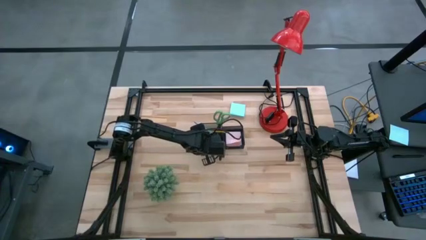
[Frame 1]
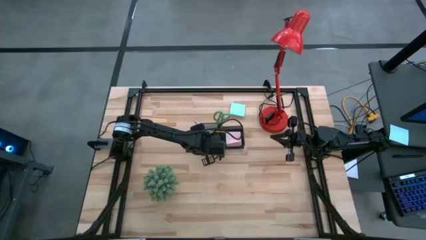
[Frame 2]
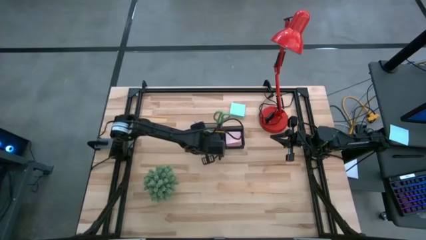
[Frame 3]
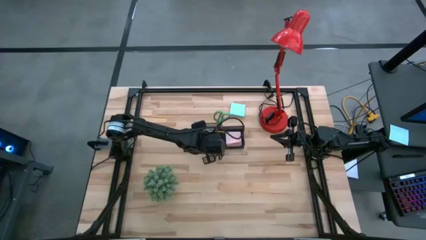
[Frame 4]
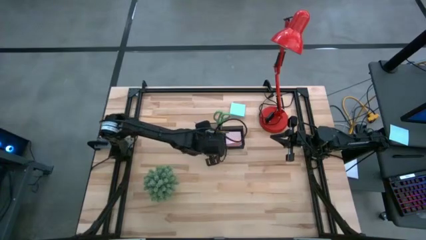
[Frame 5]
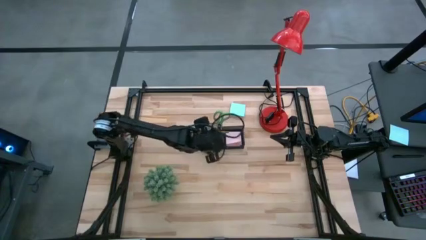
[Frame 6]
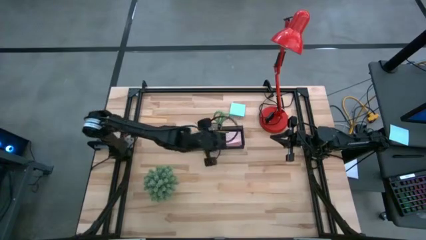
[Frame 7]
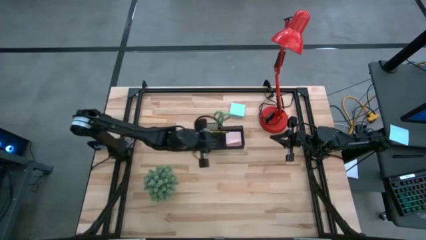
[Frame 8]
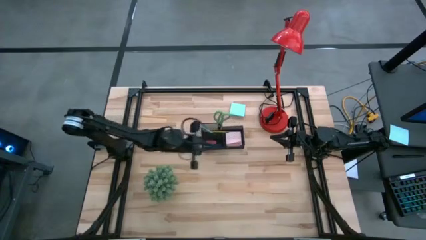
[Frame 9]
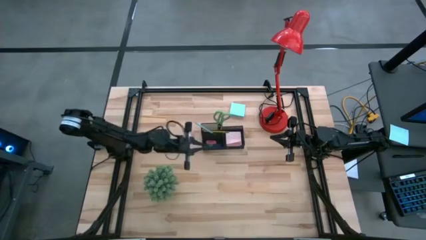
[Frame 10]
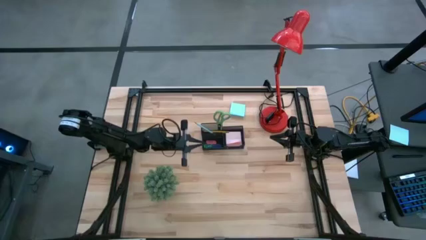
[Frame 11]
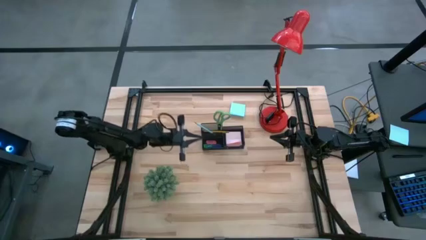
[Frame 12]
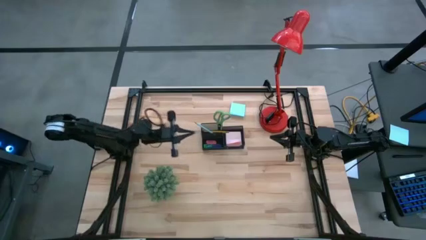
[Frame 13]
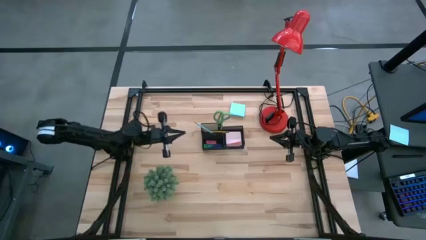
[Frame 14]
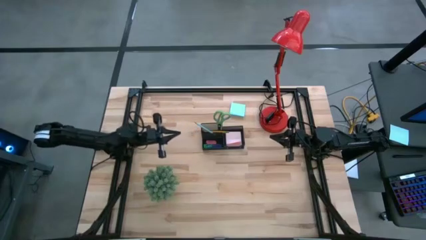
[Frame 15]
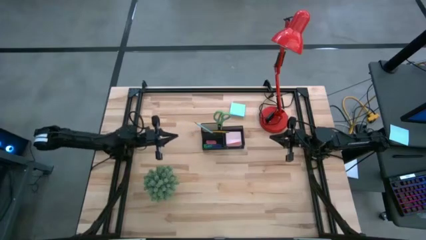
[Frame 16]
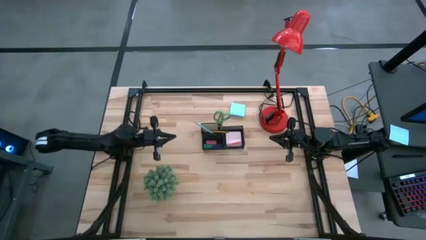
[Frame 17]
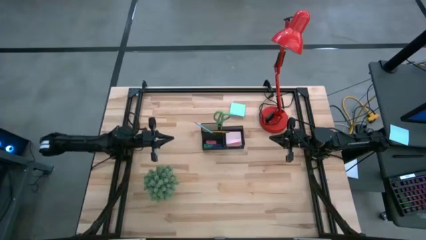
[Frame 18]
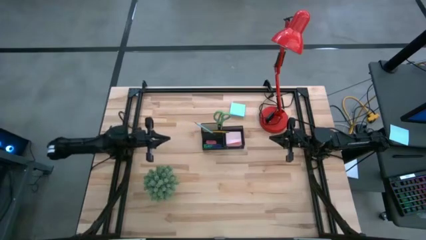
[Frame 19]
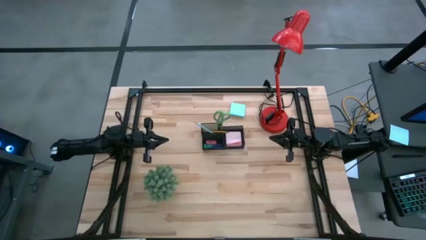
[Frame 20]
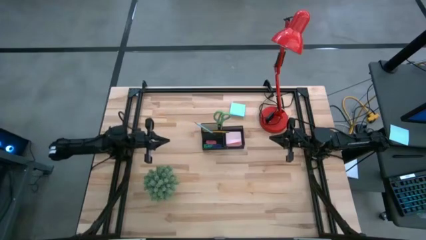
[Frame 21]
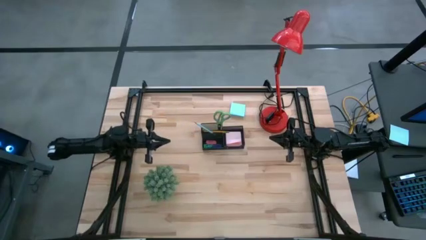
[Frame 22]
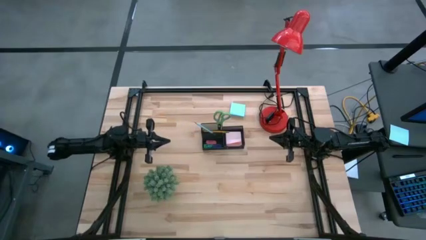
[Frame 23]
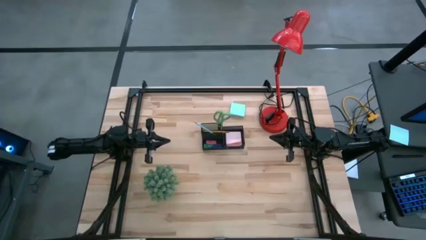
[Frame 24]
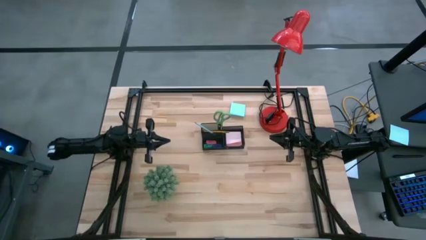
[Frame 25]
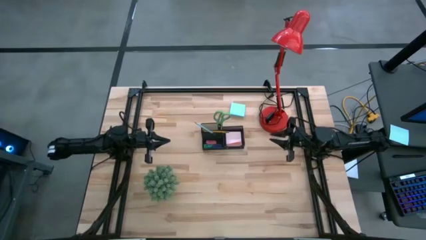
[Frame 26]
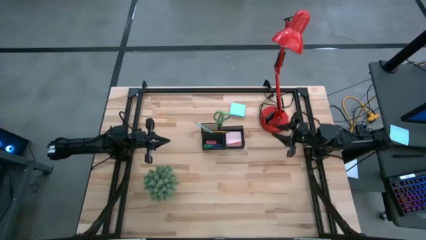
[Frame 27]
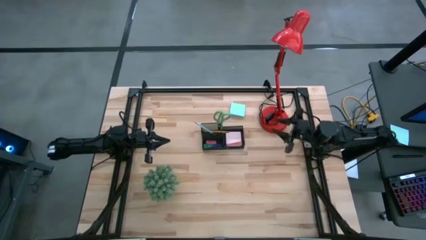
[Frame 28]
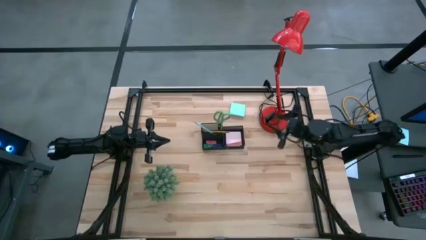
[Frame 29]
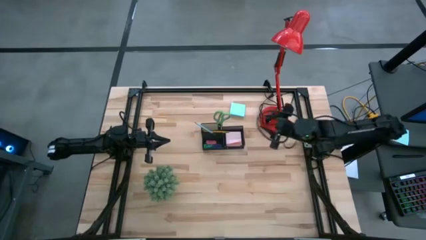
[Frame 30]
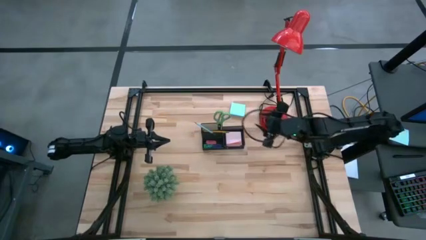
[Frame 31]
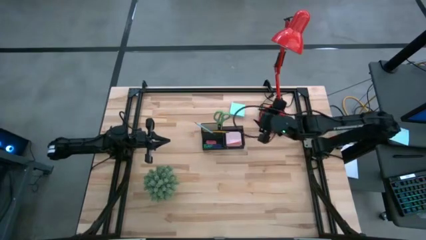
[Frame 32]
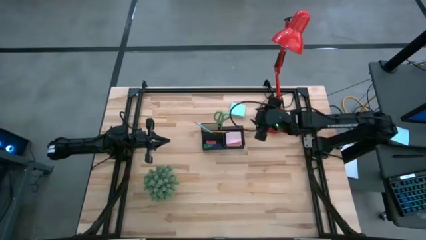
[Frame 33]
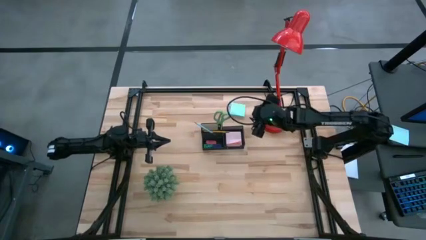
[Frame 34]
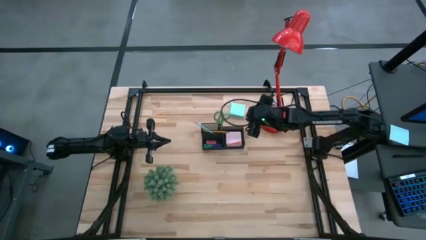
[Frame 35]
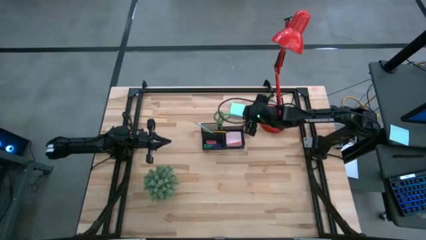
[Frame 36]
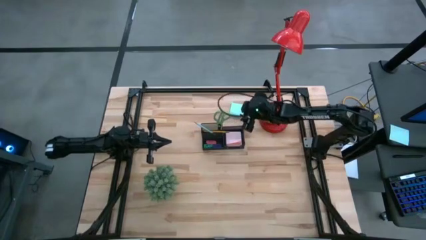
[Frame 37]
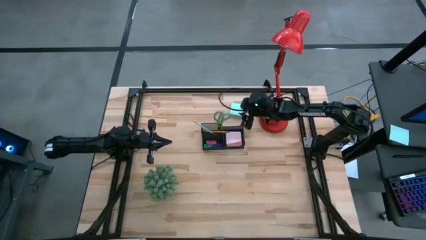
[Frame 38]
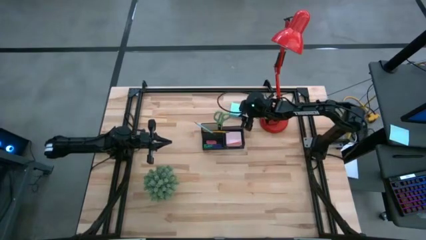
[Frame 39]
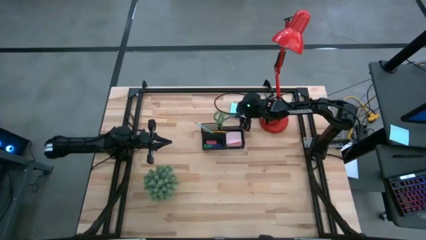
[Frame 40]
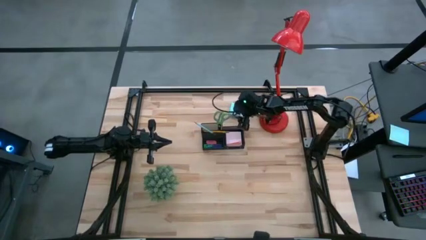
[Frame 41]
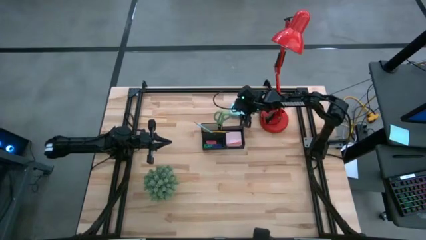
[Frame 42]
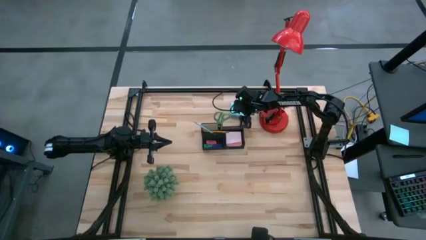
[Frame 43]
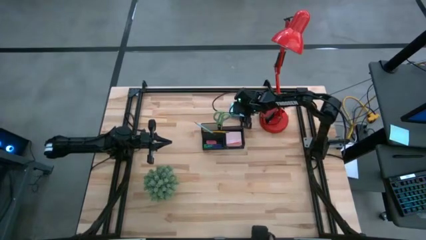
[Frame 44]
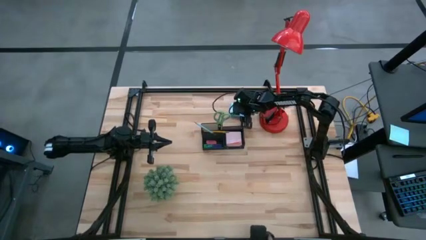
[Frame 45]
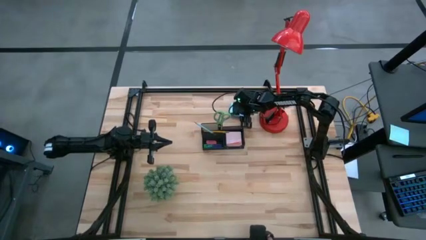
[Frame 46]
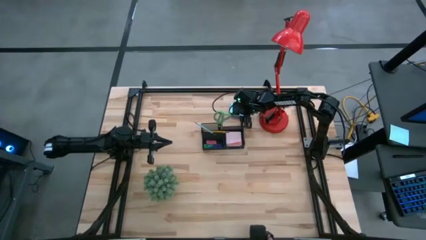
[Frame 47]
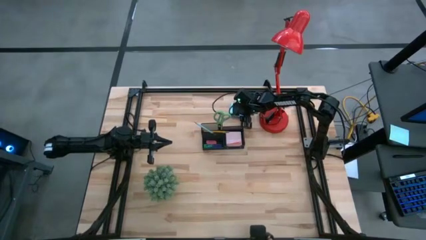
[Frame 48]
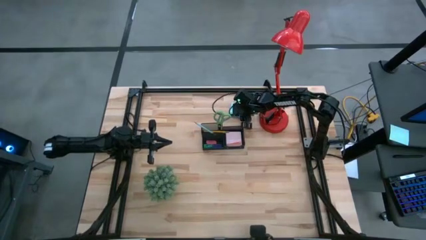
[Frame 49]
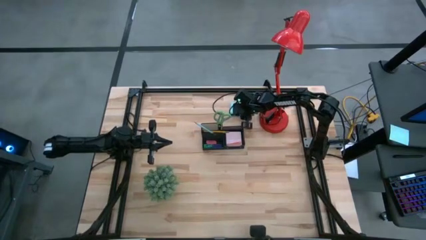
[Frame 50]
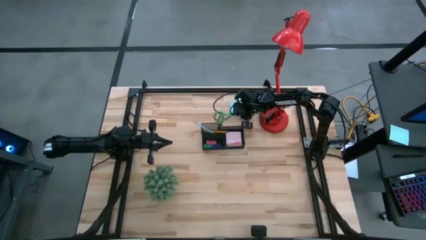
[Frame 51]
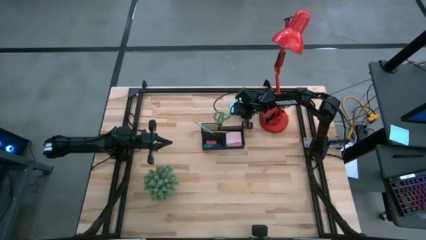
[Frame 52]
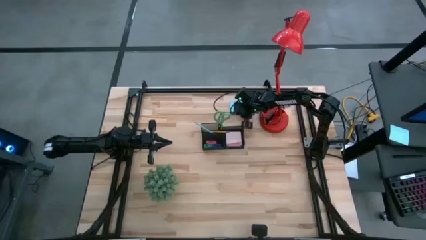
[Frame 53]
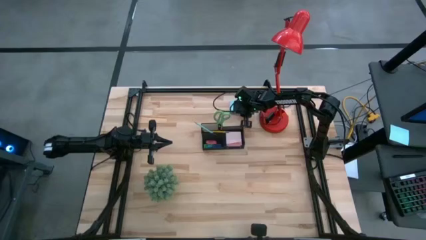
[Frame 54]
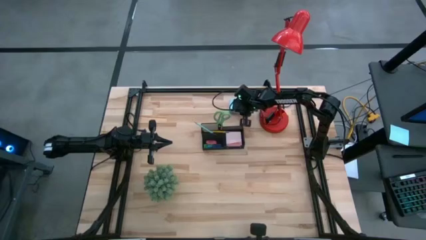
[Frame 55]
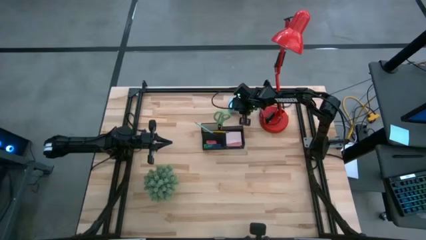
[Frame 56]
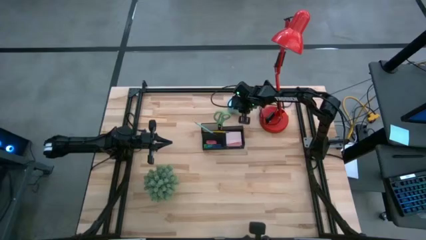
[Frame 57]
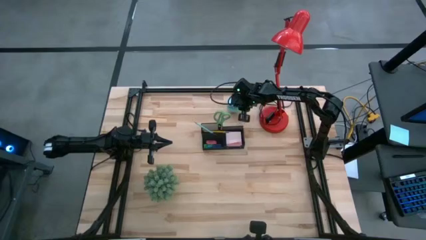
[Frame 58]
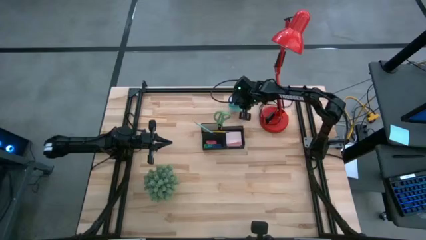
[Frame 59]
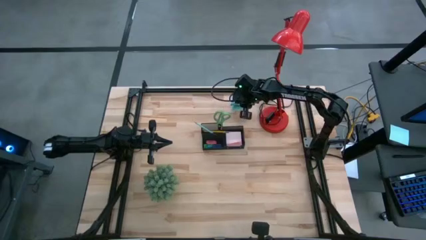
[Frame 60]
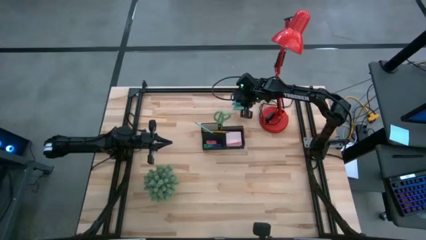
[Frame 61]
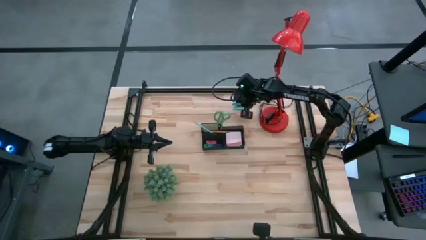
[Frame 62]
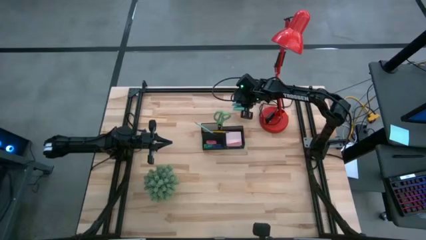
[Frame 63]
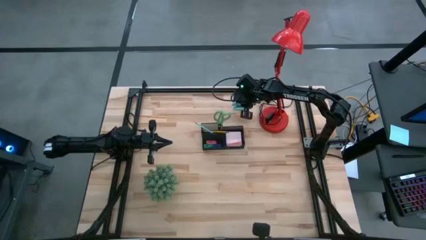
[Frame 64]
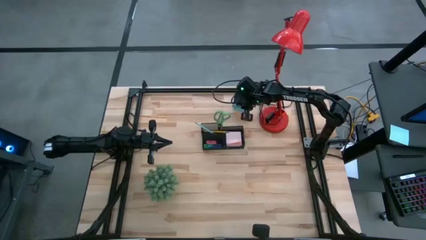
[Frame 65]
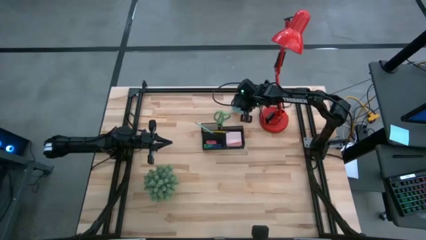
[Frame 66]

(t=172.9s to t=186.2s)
Task: Pick and place office supplies into organizer
Put the blue sticky notes into the black desk organizer

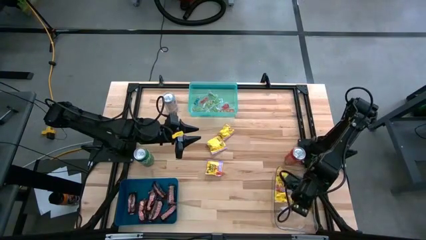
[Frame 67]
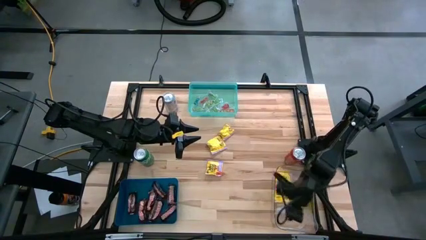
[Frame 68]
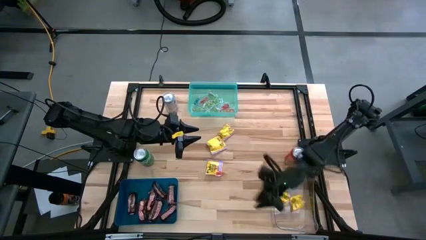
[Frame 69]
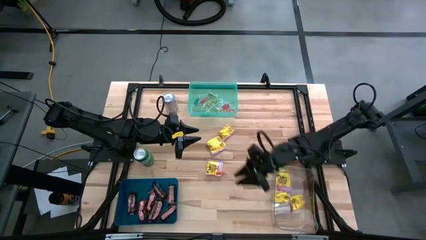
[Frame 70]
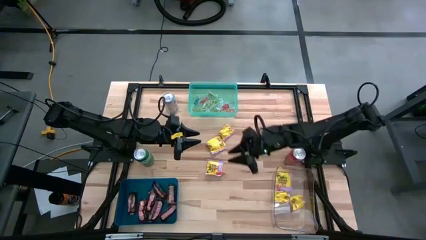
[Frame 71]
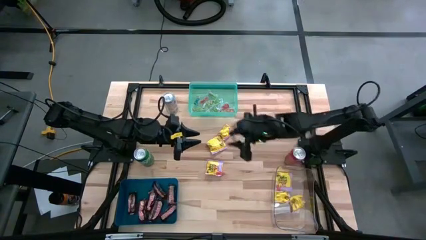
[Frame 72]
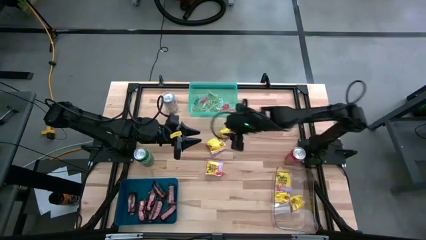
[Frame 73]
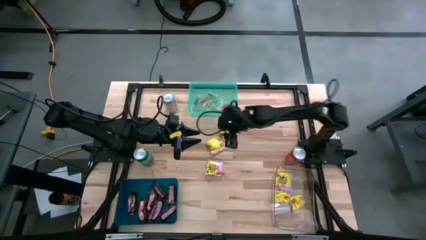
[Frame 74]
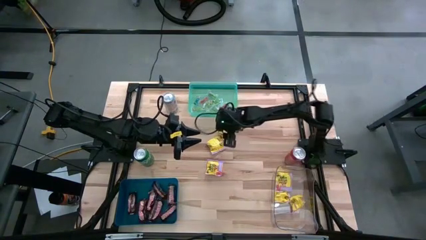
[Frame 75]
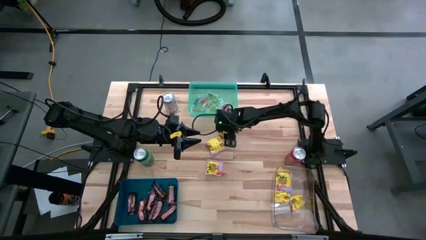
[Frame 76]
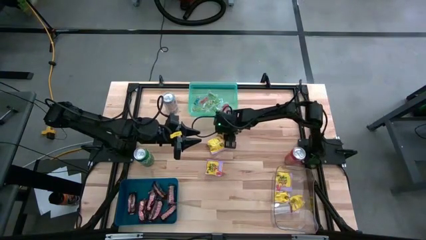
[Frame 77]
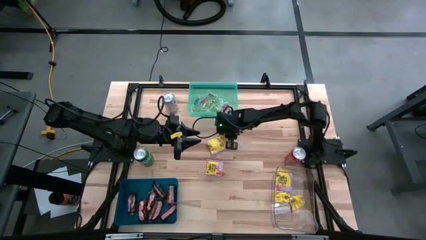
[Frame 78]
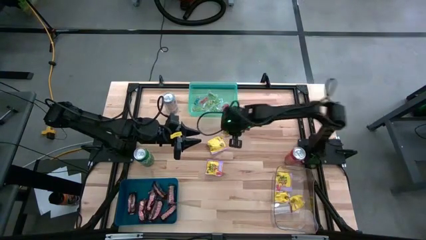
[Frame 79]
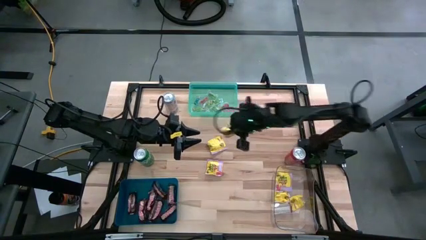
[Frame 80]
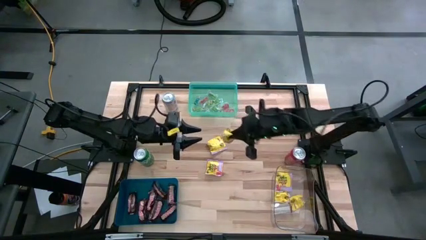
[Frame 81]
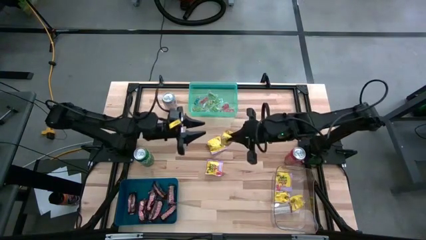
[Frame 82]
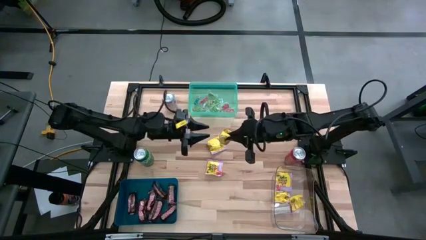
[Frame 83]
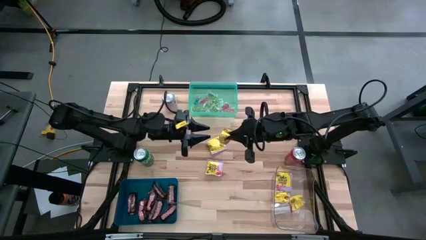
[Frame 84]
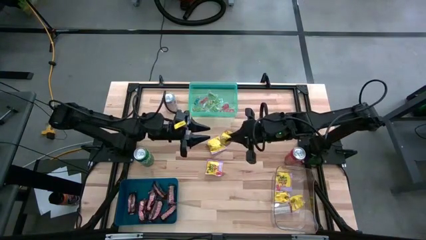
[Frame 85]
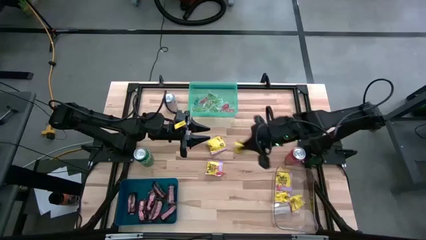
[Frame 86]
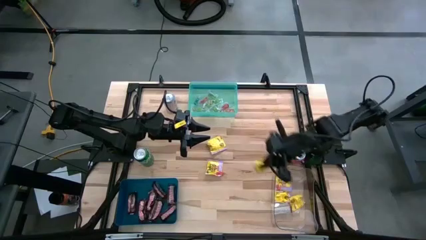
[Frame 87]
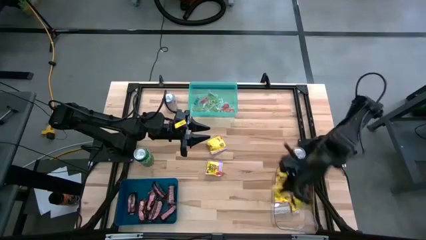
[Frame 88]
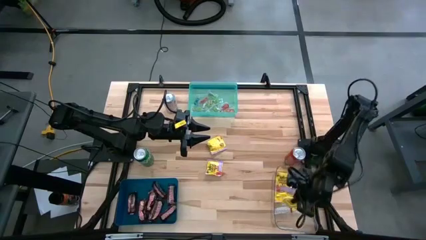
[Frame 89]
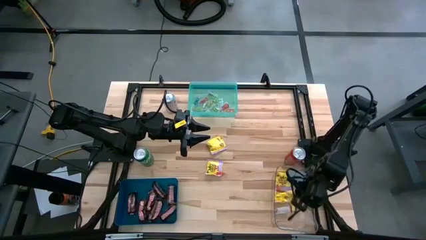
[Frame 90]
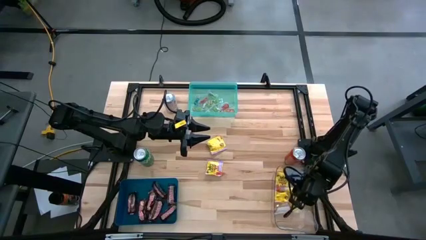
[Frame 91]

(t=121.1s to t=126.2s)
Task: Sort candy
Put the yellow candy into the transparent bin
